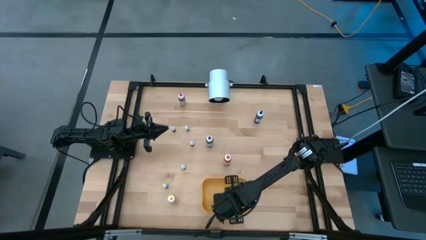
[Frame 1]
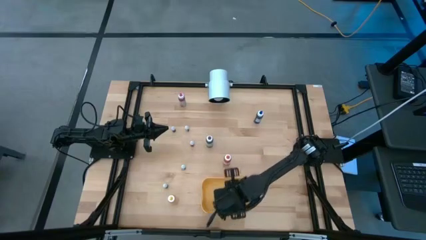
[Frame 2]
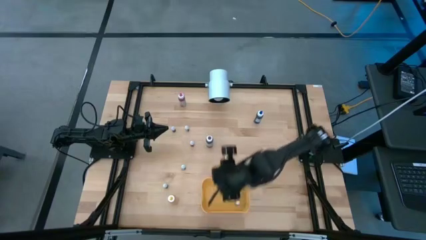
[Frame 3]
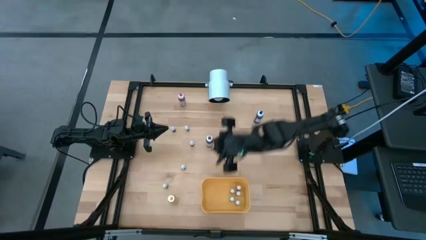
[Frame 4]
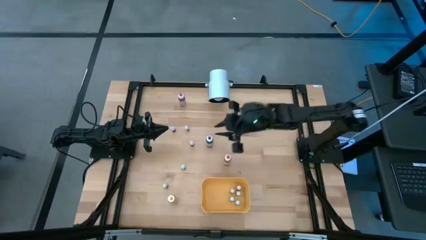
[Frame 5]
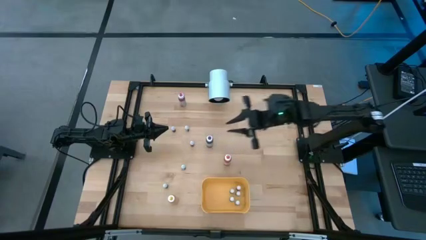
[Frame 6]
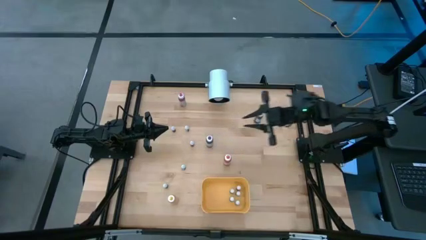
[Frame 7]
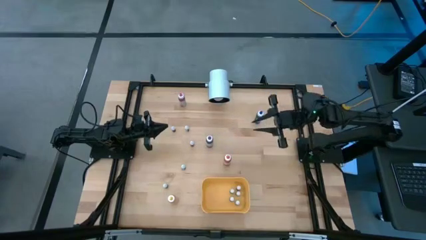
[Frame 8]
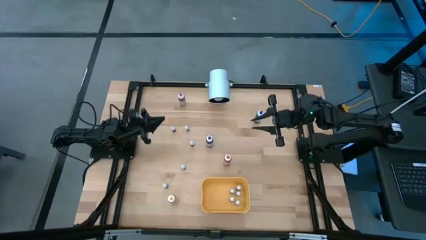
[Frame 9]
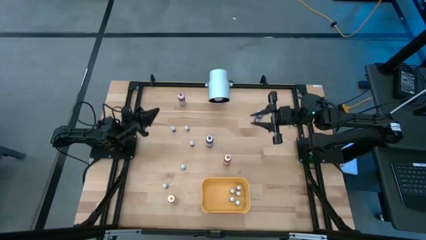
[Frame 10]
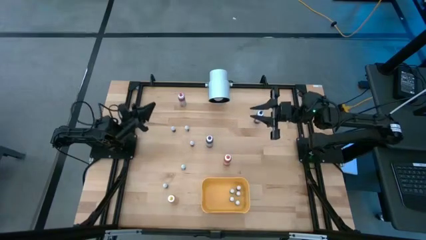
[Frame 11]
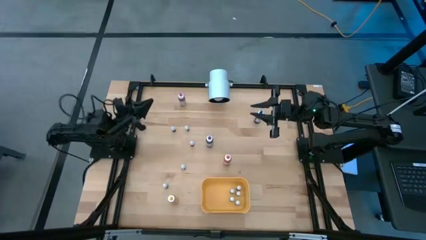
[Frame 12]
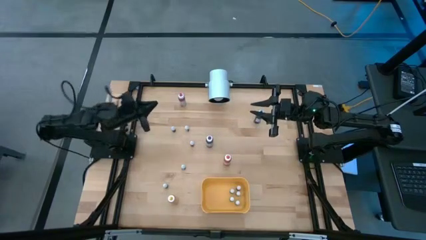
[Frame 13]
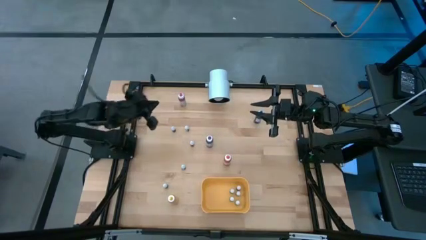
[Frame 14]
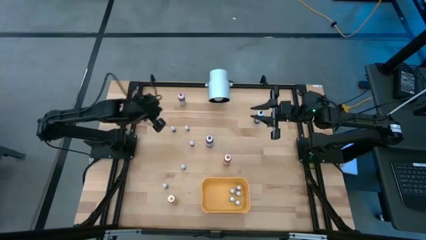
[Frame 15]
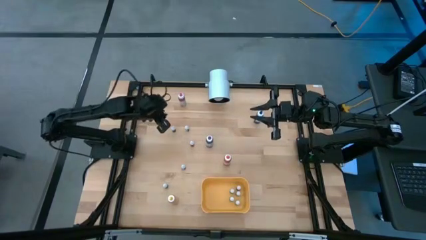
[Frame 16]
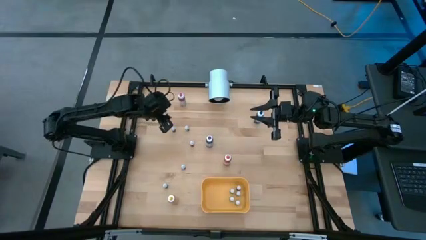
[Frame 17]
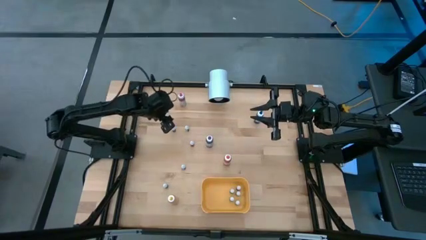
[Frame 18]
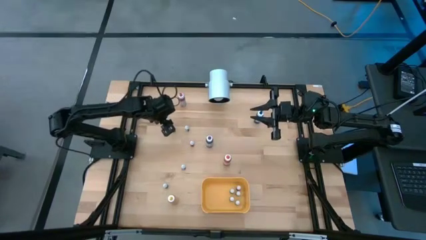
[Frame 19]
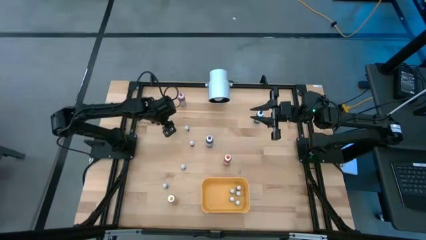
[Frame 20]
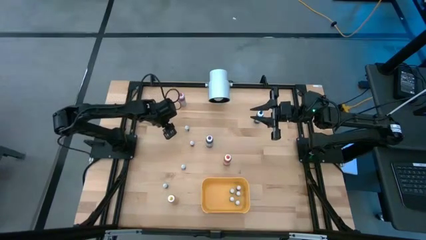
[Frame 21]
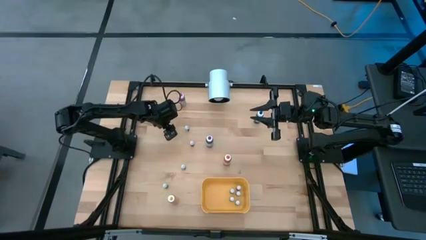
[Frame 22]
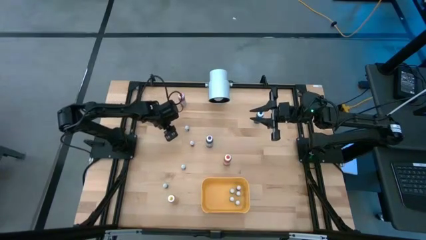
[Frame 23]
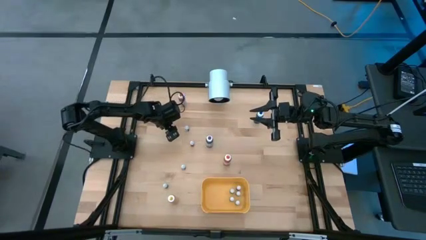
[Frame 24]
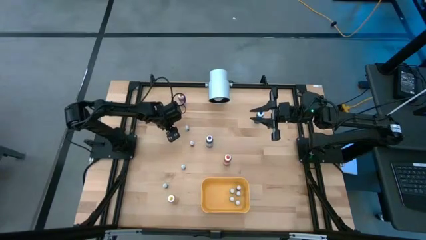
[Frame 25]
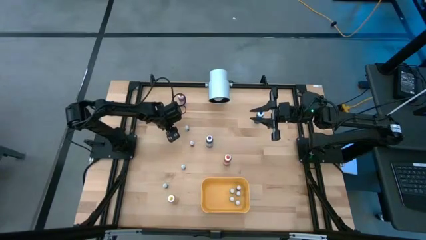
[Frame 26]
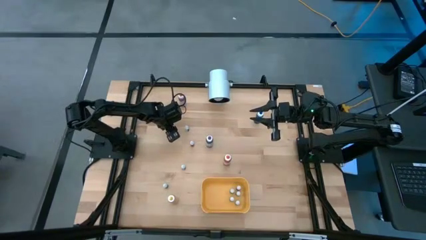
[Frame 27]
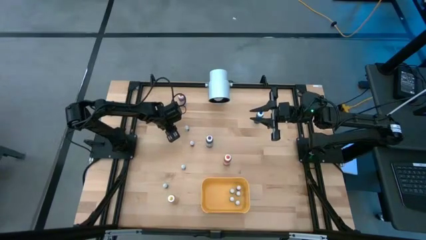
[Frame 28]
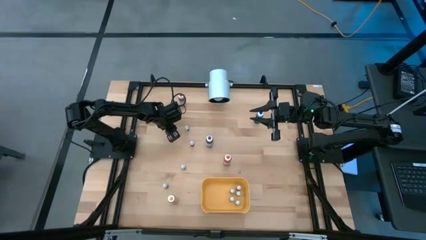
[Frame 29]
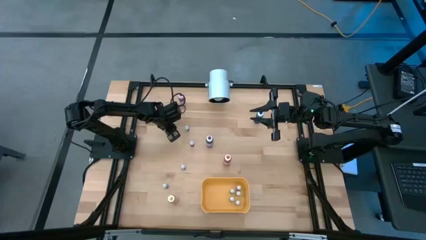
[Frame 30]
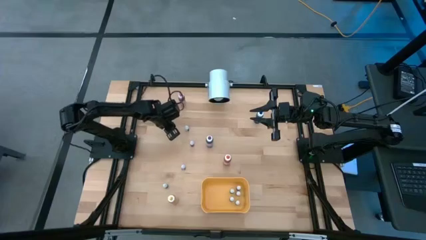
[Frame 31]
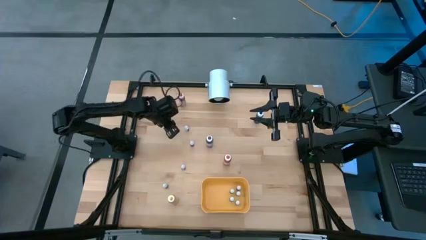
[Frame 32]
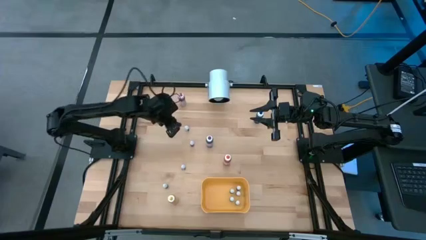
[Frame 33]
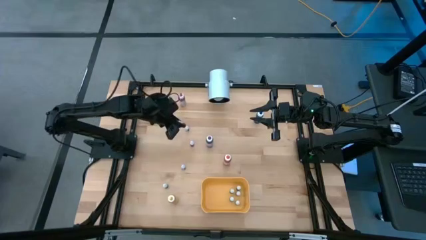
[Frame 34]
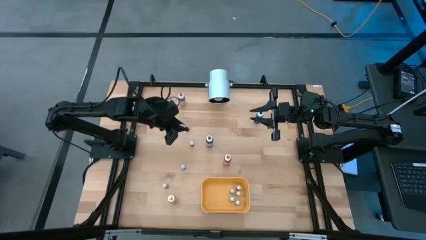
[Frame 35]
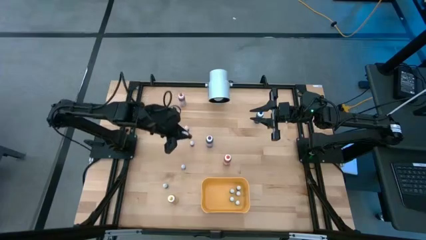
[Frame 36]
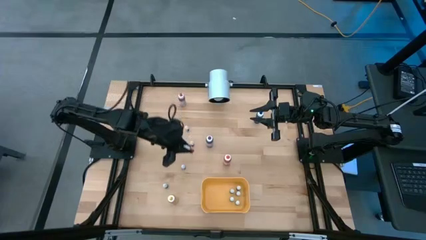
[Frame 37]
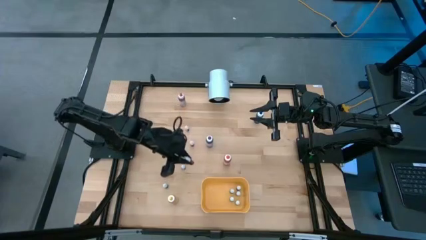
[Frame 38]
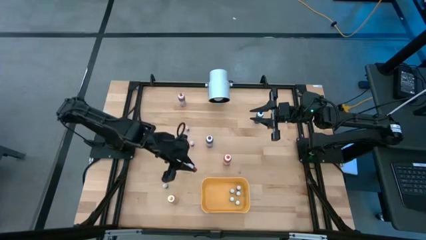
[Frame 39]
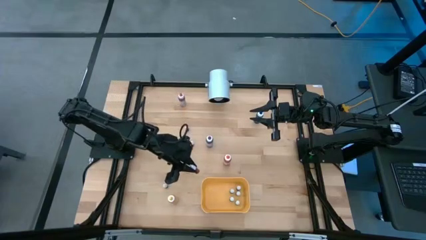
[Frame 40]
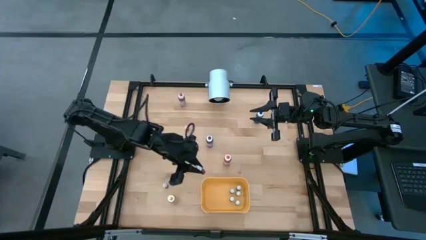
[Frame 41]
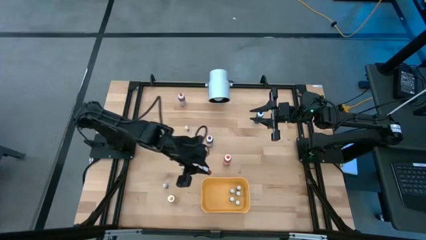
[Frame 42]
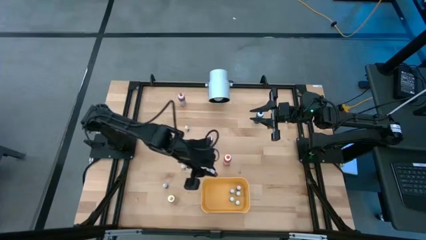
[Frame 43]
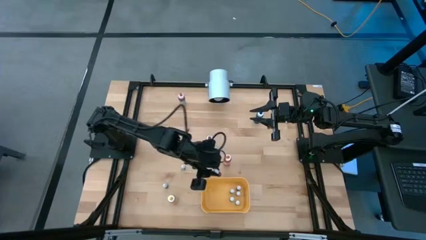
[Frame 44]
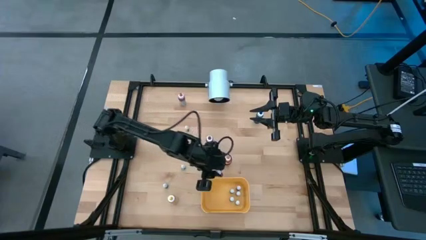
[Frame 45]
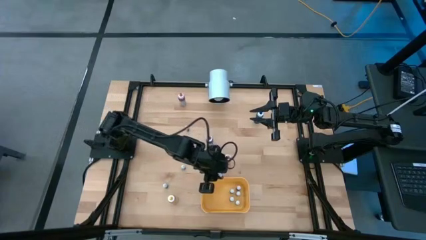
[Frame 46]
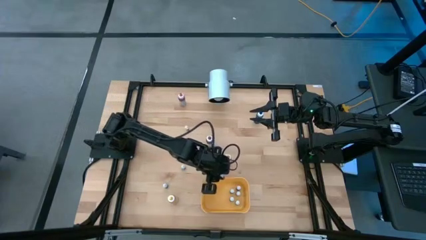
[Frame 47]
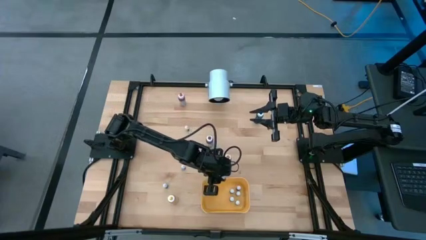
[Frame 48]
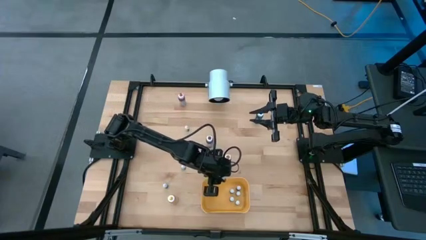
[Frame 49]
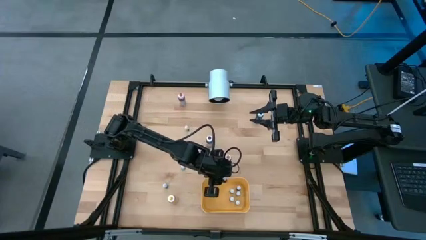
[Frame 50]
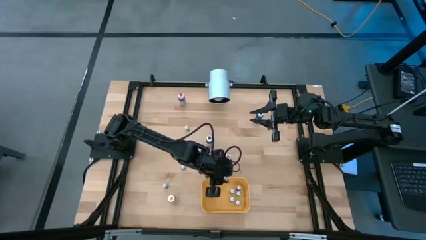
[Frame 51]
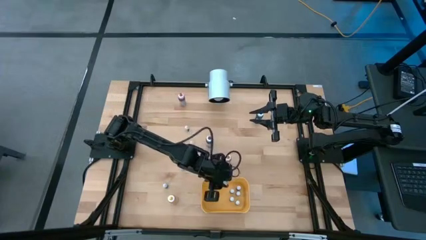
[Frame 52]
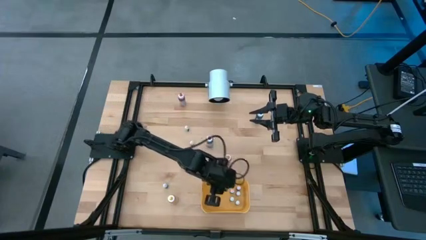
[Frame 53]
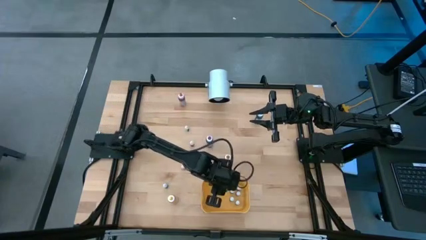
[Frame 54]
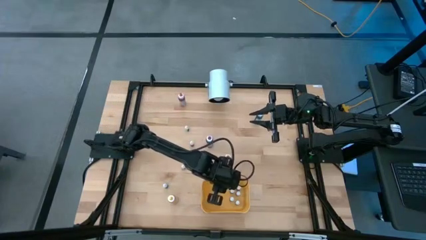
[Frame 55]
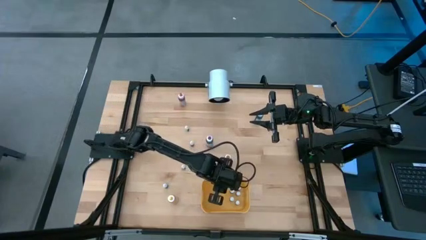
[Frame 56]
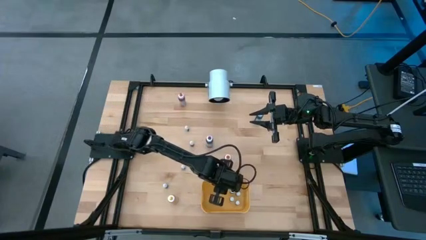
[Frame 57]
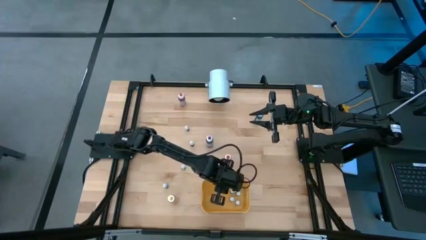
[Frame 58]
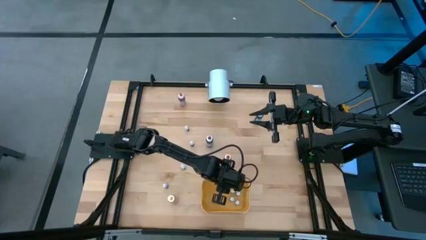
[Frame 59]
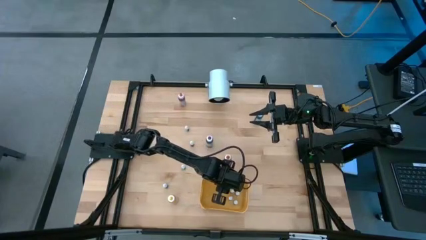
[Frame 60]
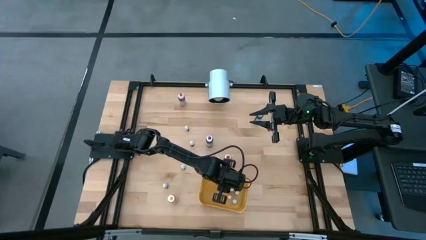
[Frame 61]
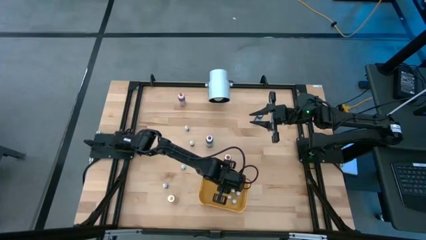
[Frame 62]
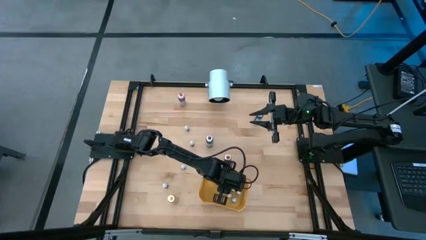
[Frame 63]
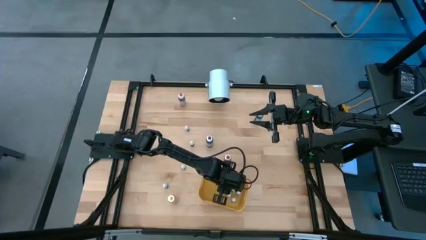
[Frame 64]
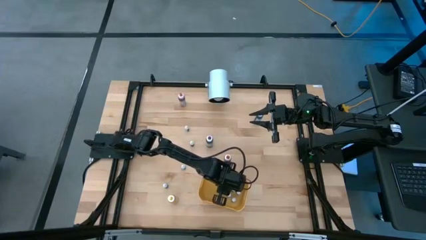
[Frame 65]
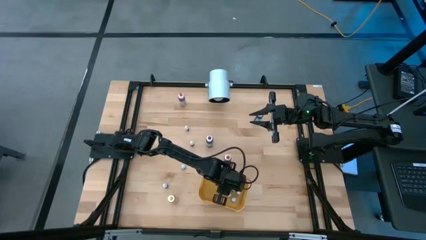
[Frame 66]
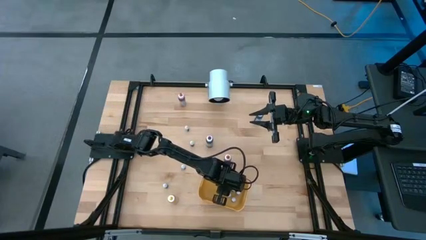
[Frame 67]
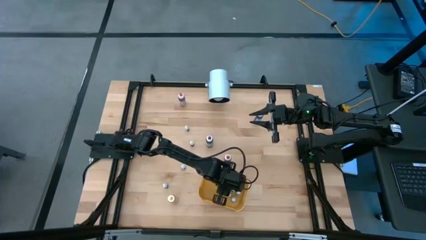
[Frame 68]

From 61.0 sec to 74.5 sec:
Task: Pick & Place food coloring
Put the small red food coloring bottle into the yellow container
